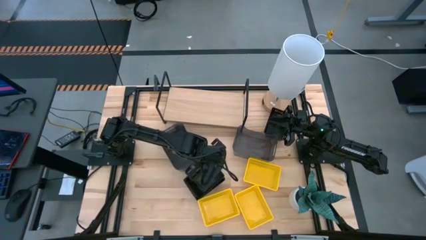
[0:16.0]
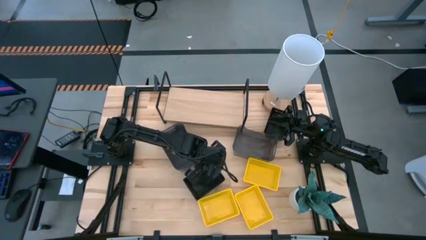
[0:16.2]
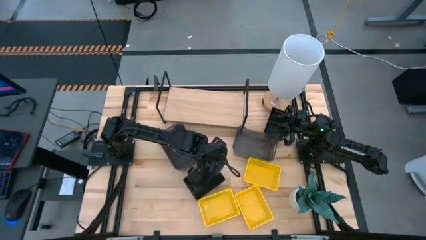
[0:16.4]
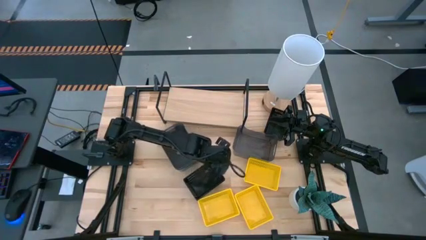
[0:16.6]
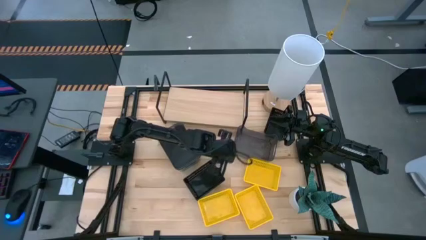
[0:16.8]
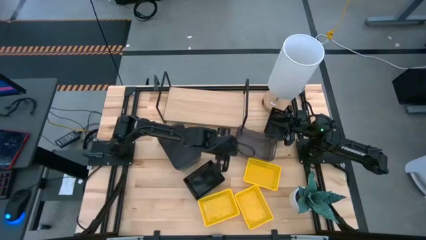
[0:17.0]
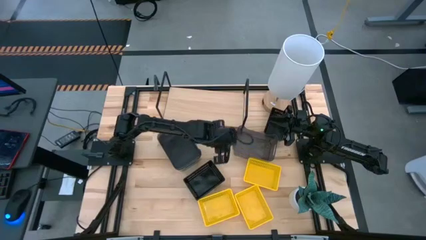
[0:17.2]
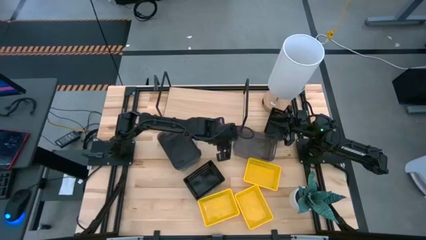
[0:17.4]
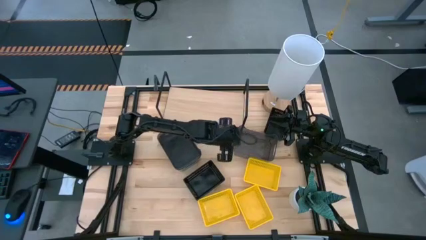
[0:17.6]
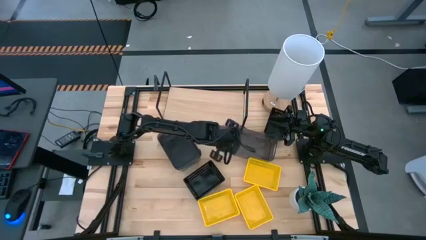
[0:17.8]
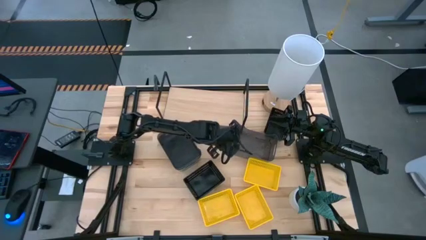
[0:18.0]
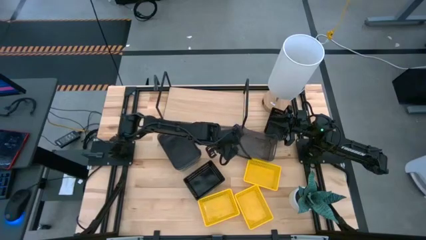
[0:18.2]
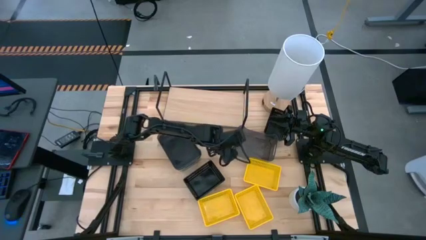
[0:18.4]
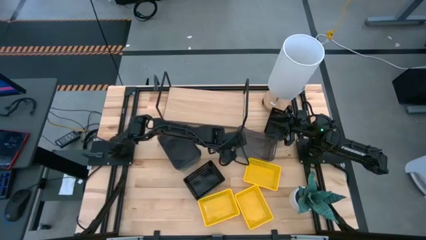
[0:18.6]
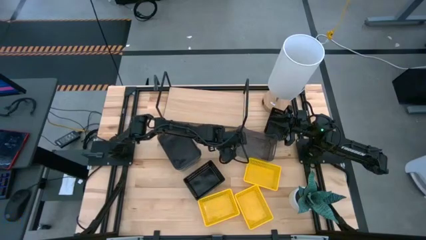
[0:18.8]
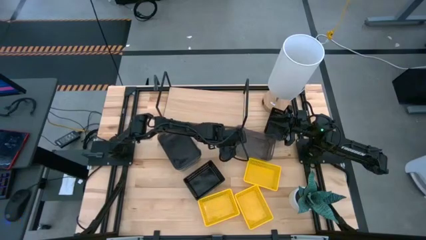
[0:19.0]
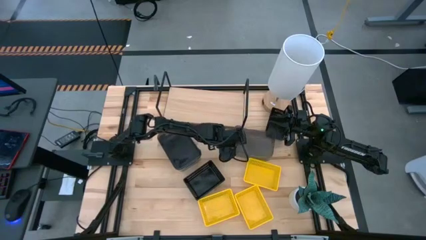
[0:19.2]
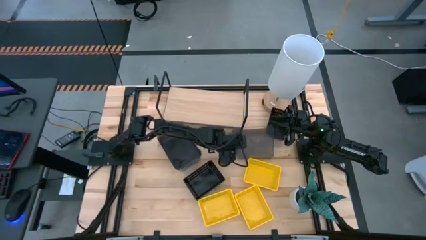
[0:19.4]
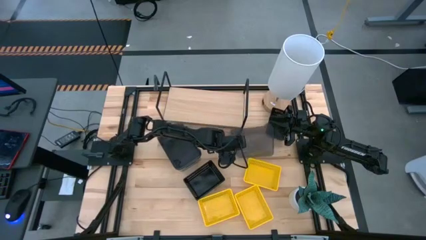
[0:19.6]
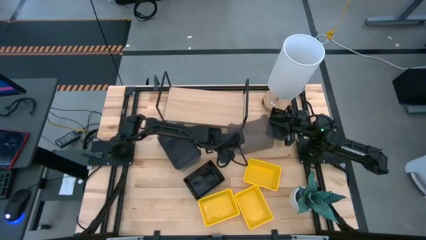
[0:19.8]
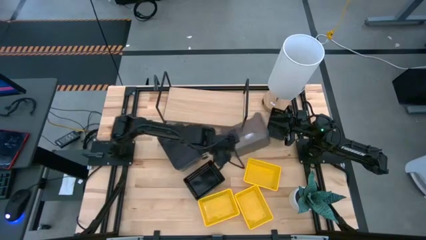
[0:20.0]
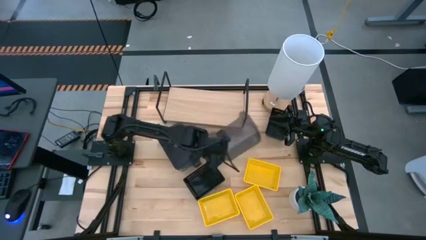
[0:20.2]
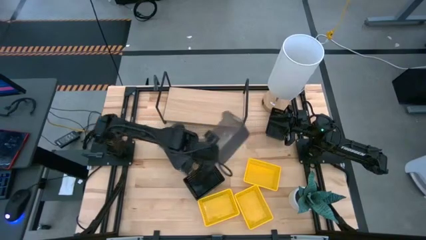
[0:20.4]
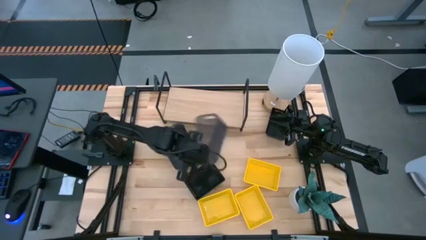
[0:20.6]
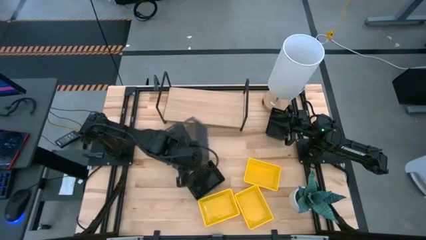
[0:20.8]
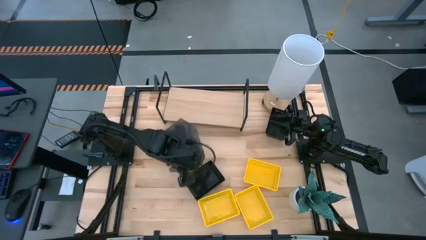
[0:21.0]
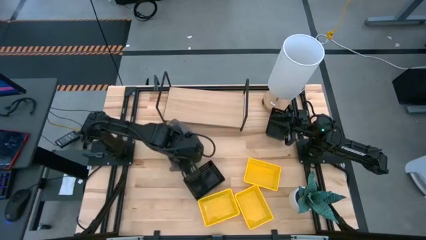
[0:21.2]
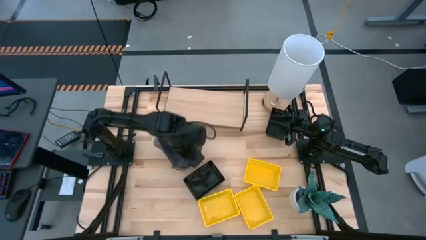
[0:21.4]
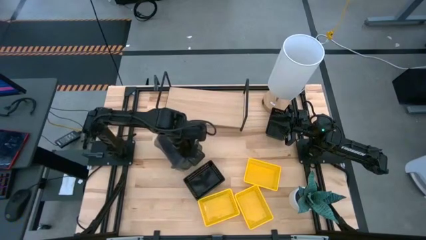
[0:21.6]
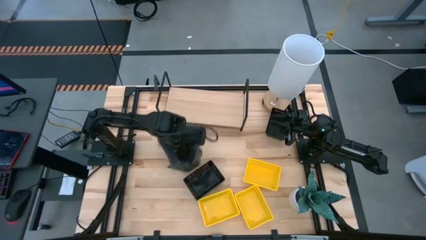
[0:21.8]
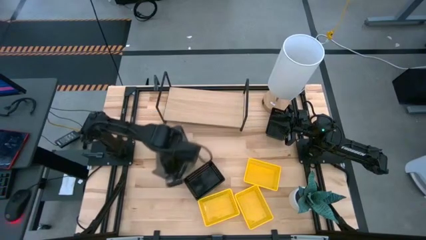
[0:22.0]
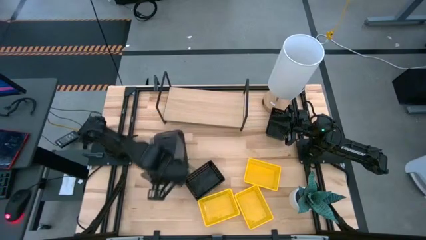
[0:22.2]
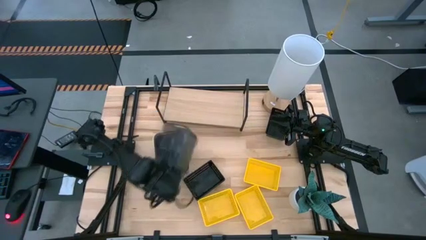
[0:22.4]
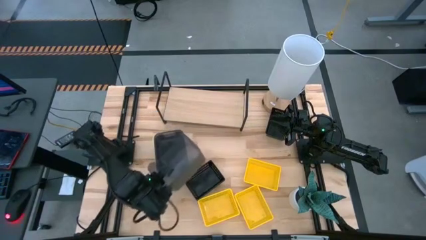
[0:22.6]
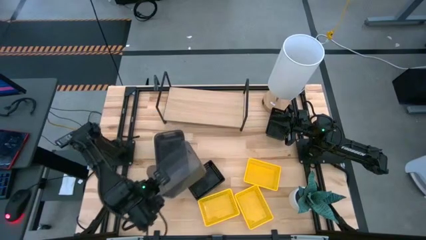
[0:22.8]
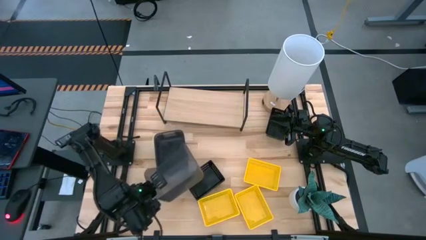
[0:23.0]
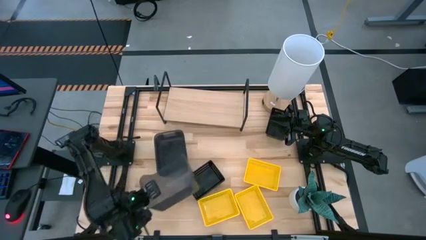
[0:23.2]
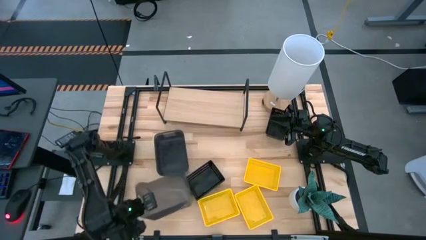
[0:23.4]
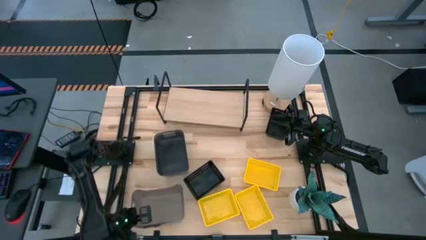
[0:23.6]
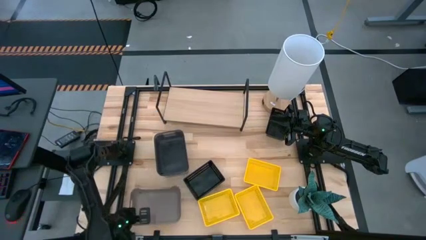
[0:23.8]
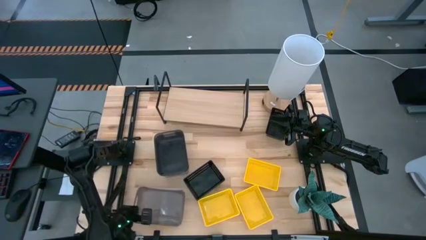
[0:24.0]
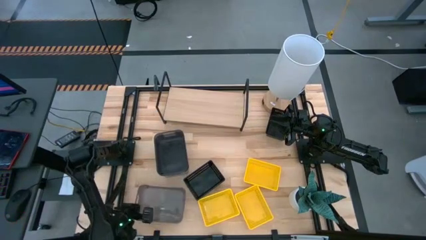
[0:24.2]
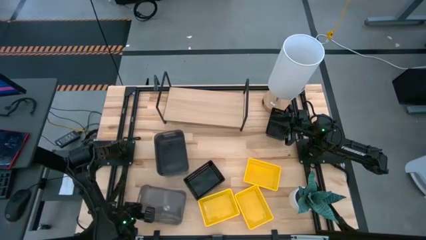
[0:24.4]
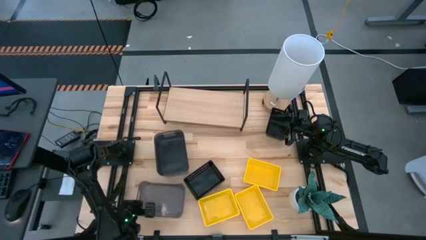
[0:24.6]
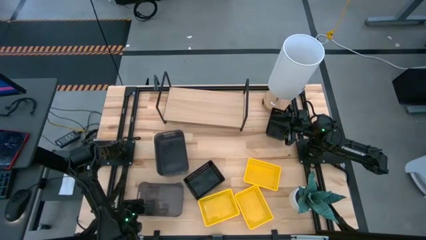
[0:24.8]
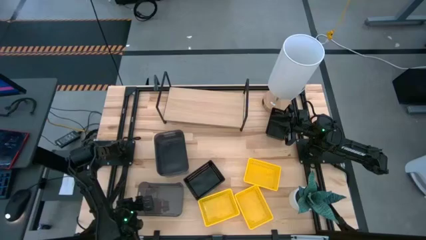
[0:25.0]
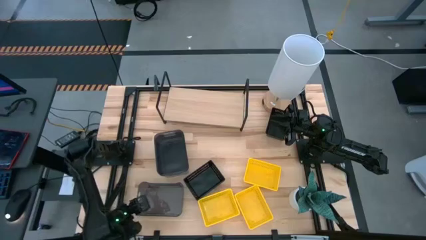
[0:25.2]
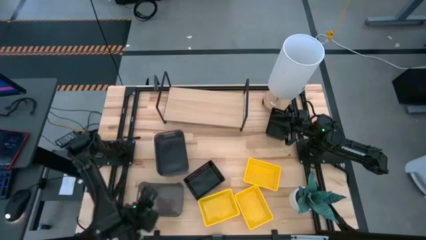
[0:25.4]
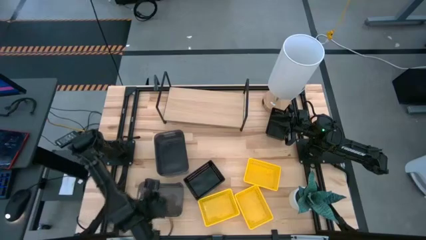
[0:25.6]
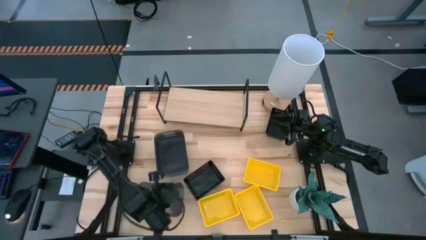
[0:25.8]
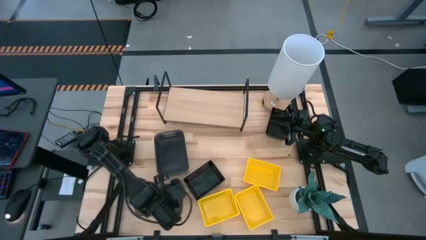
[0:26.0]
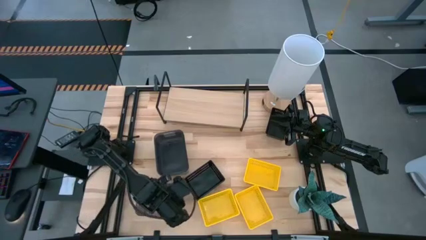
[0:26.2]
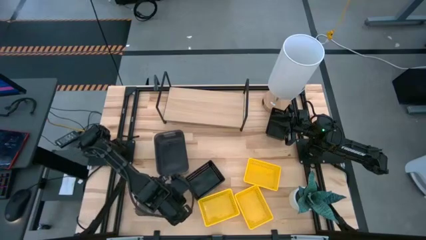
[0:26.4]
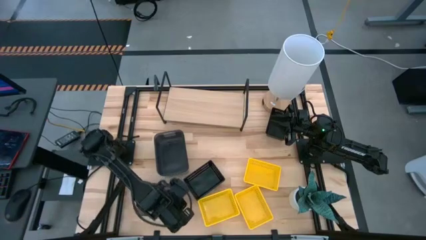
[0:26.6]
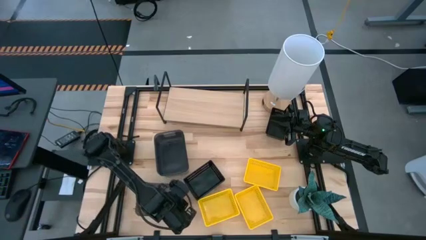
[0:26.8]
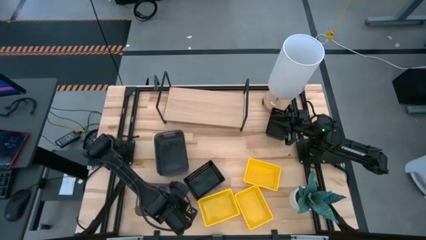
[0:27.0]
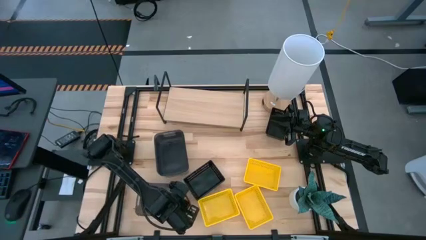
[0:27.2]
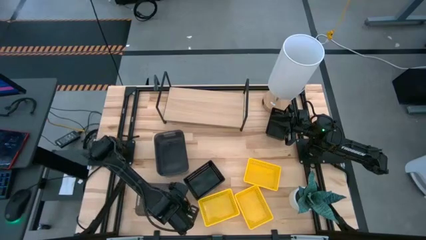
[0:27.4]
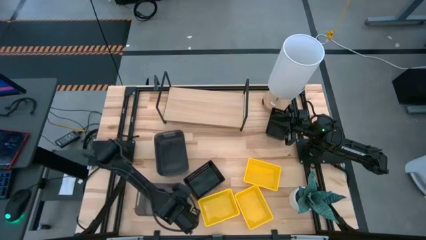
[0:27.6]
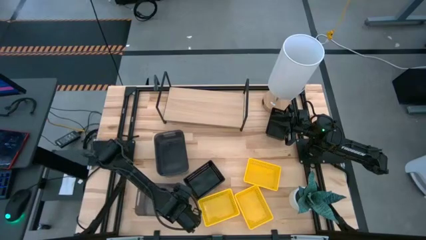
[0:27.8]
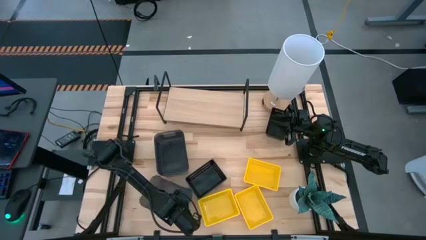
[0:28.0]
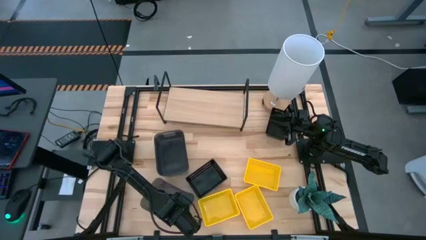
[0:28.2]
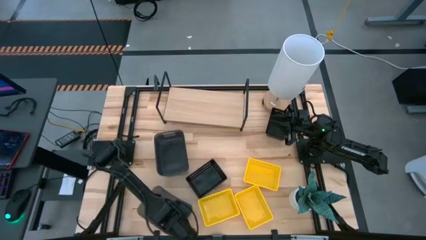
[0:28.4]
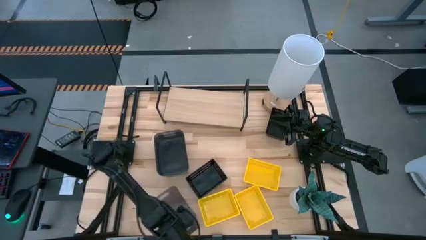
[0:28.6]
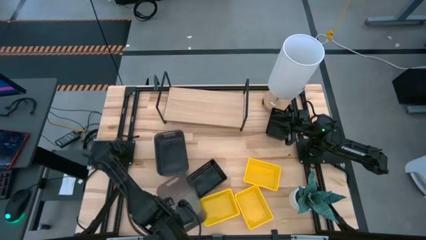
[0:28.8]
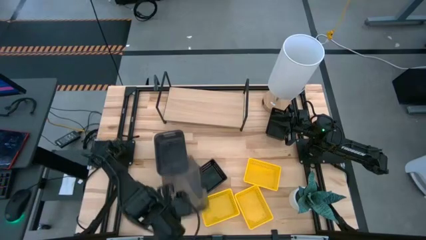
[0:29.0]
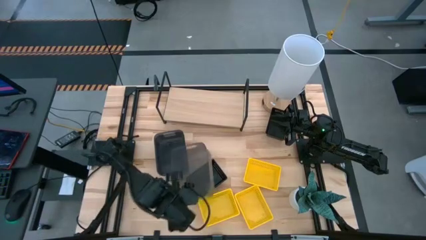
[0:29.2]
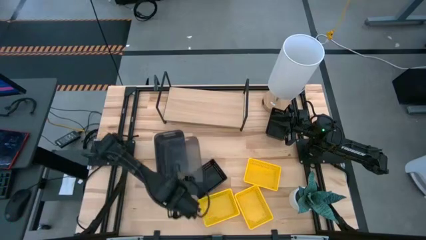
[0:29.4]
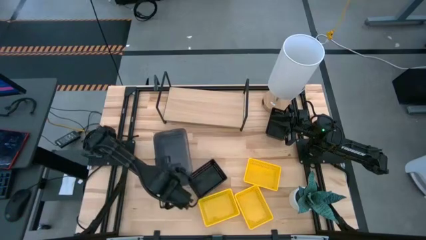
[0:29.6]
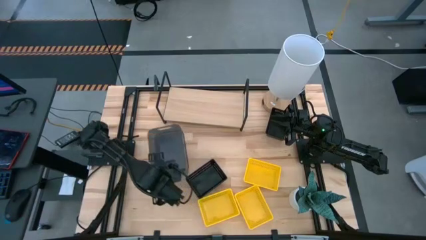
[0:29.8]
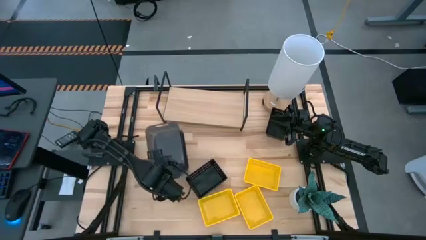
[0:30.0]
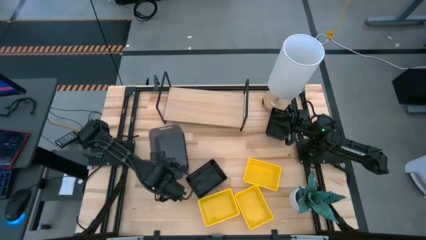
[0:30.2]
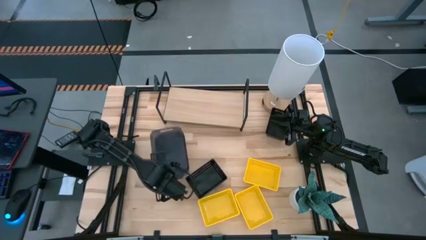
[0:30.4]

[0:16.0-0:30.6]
Task: Stack baskets on shelf by color
Stack the right black bin on top of the left black stacked bins
